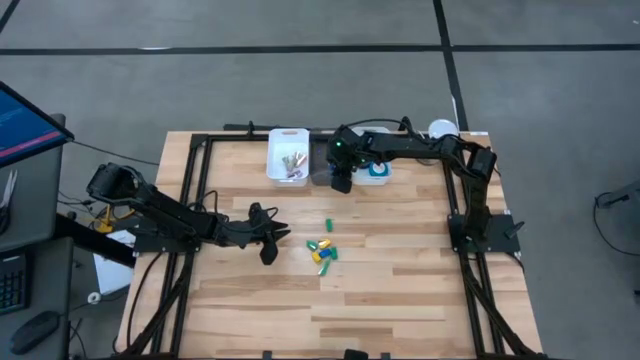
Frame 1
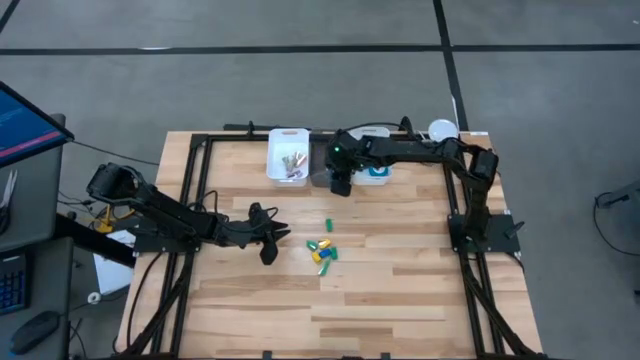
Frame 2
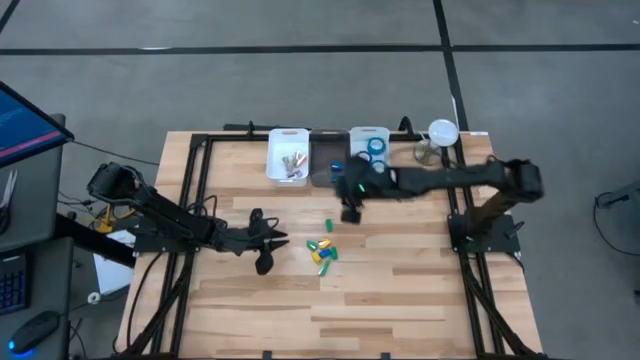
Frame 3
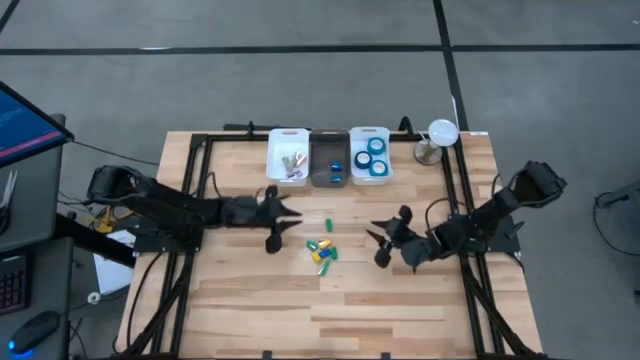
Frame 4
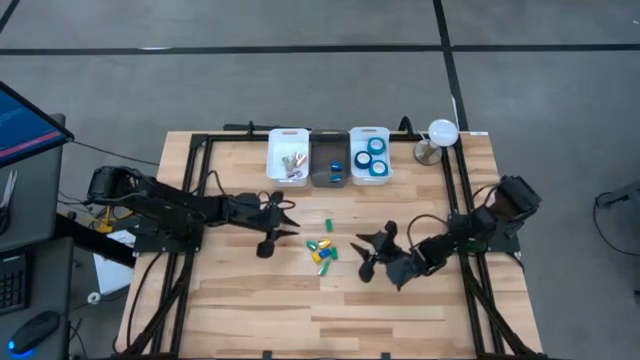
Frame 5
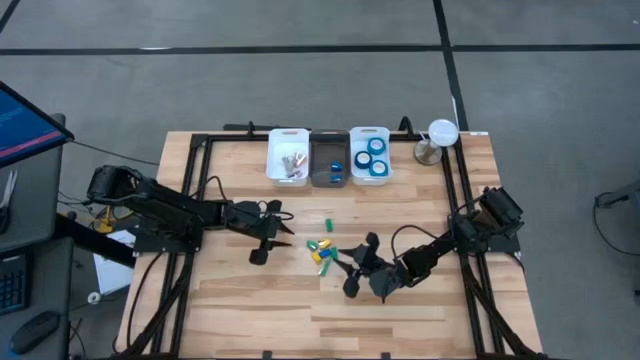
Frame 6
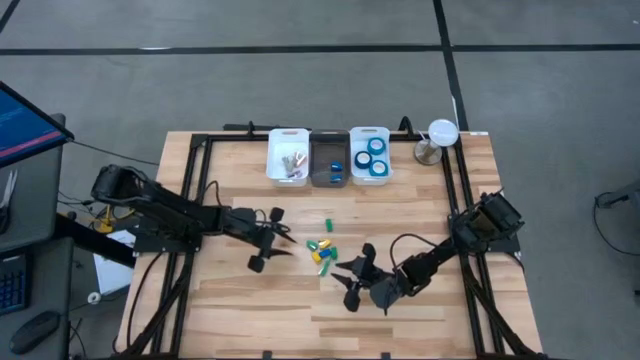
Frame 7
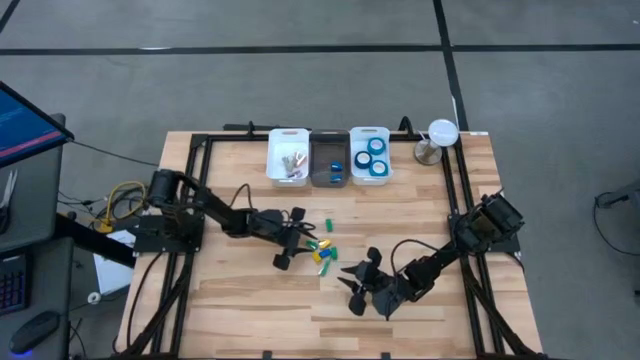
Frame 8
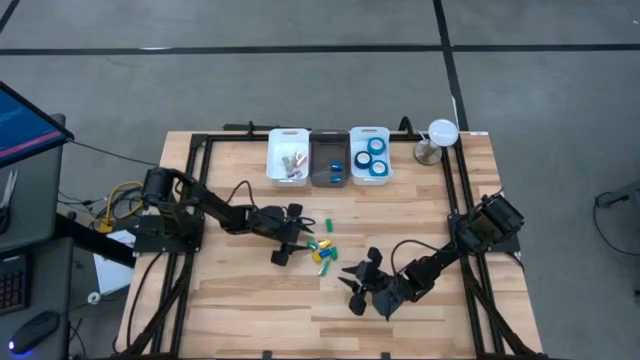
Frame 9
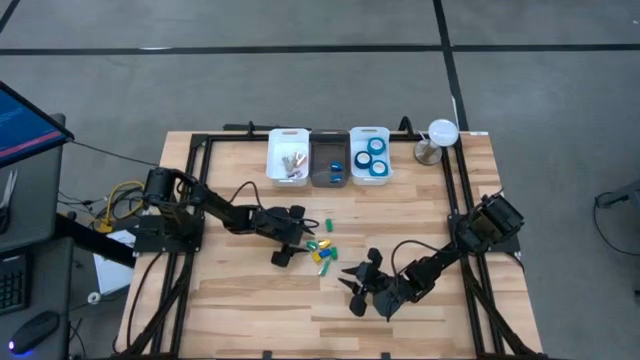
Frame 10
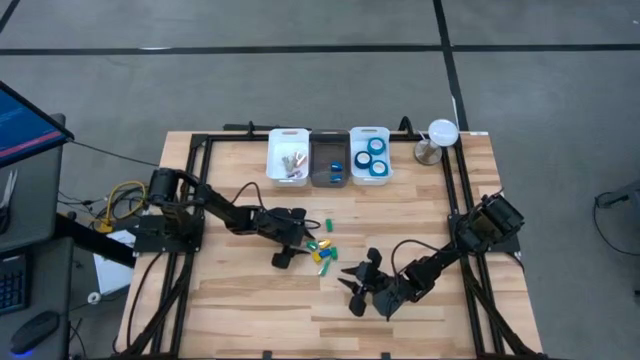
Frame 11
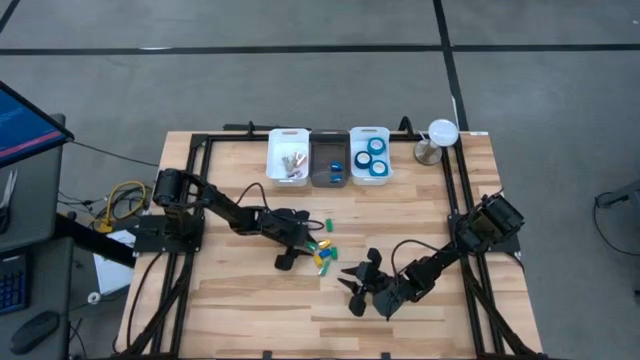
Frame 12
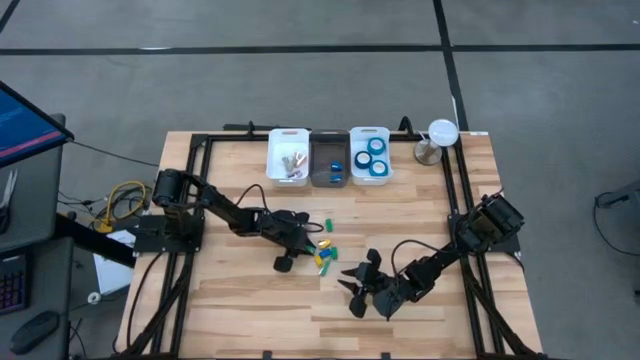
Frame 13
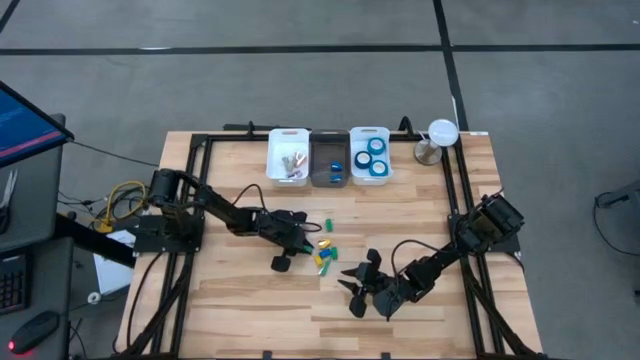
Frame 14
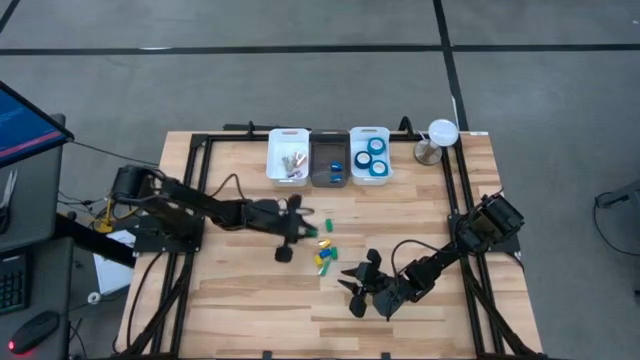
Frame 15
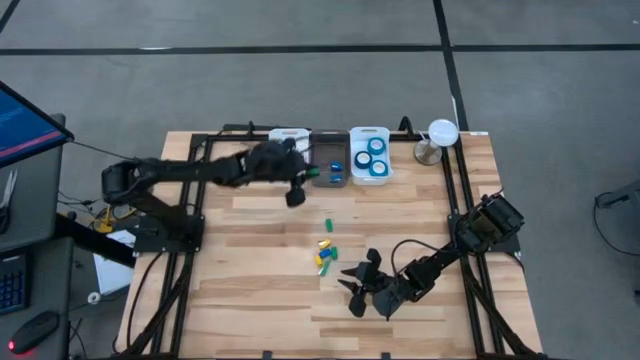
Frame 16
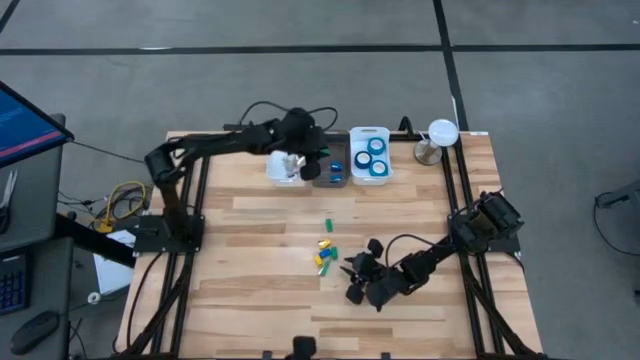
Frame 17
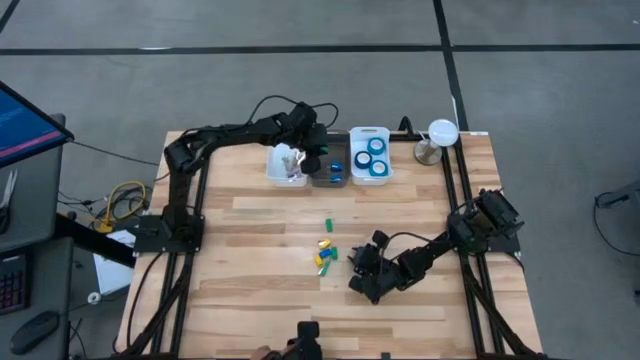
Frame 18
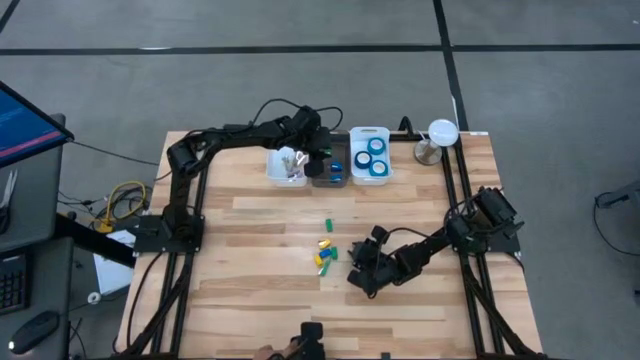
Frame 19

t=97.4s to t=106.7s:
Task: Pick and place Stapler, Stapler remover, tape
Put the green stapler into the black bin

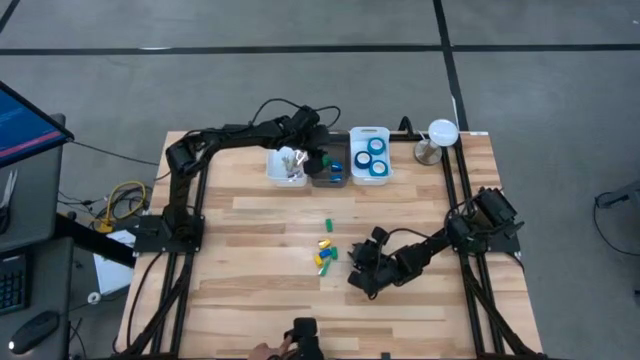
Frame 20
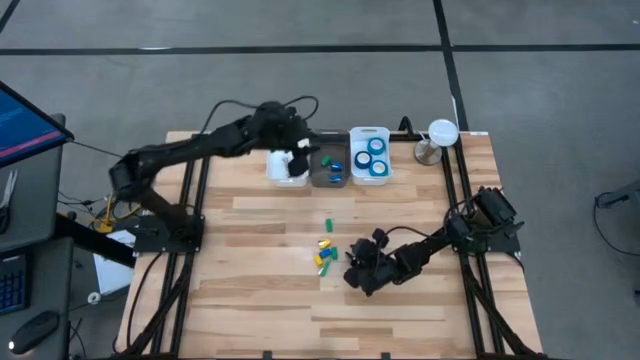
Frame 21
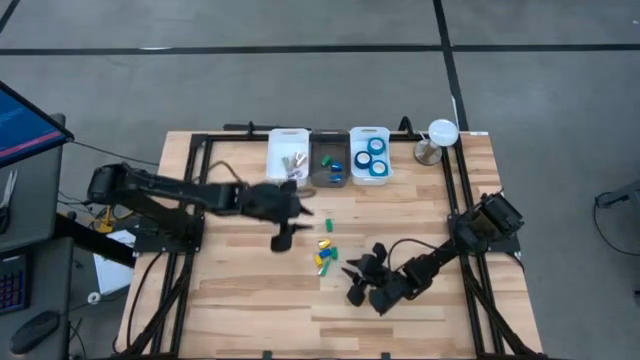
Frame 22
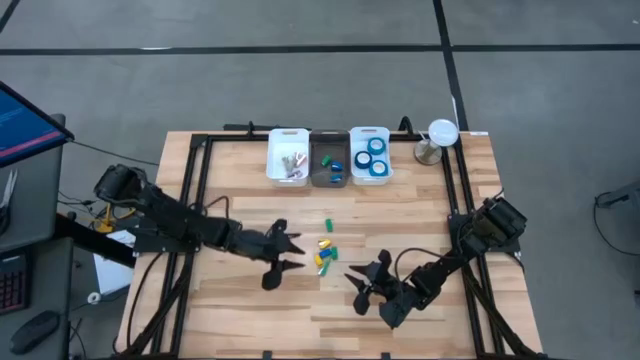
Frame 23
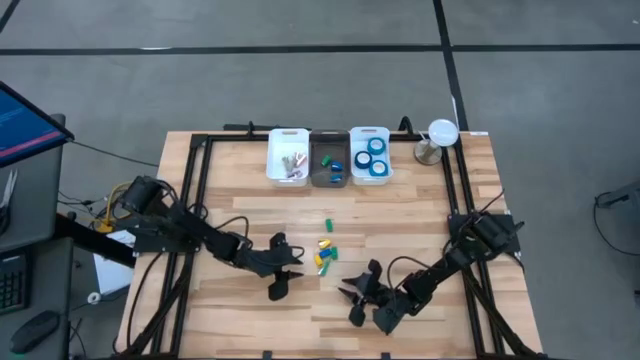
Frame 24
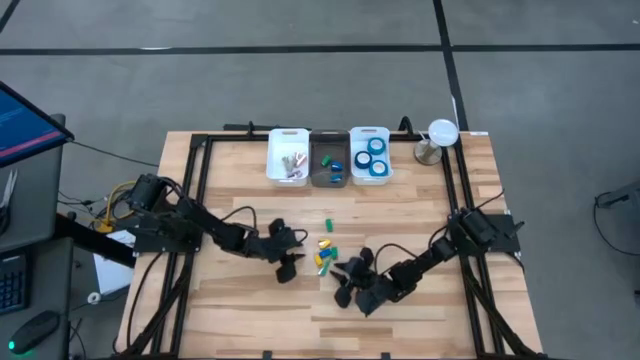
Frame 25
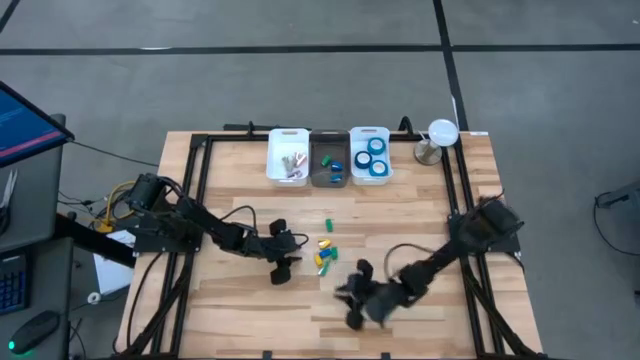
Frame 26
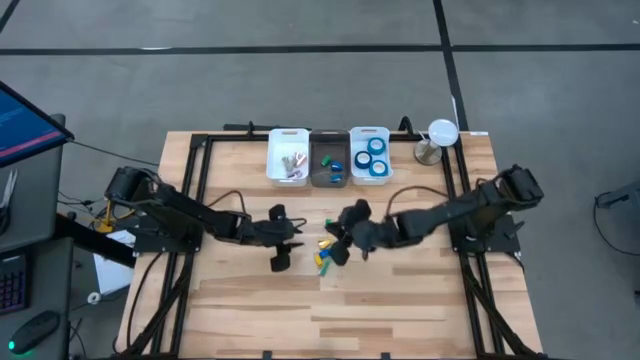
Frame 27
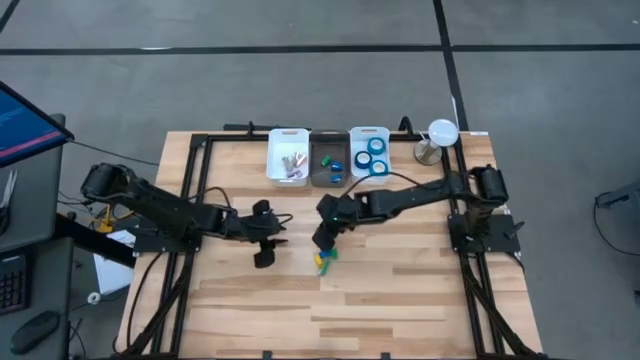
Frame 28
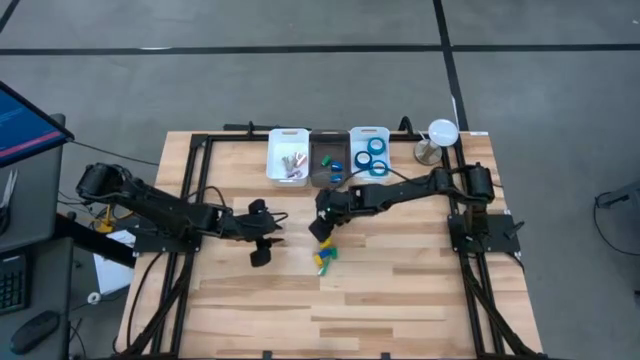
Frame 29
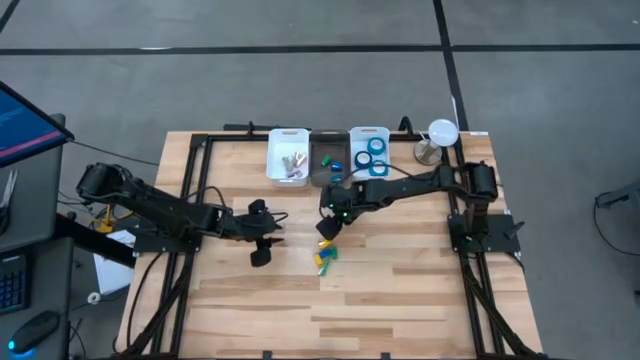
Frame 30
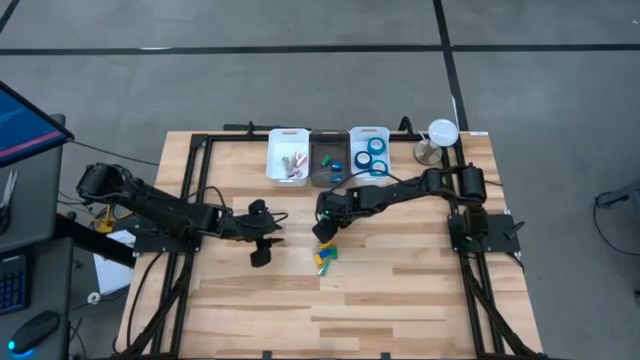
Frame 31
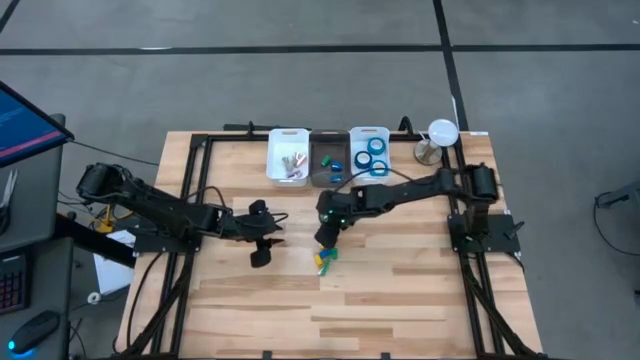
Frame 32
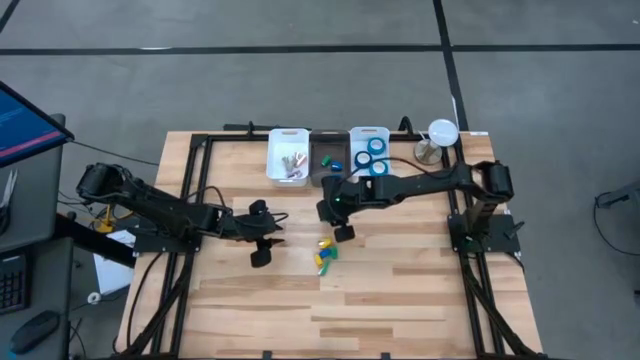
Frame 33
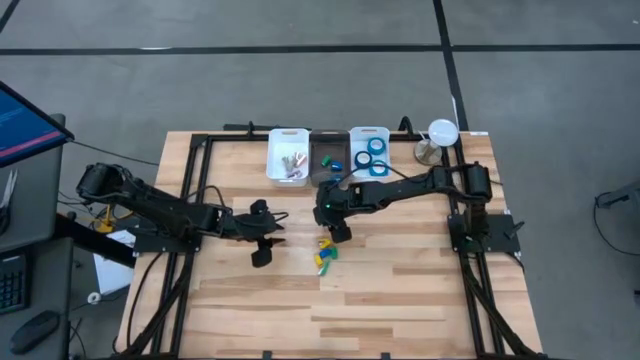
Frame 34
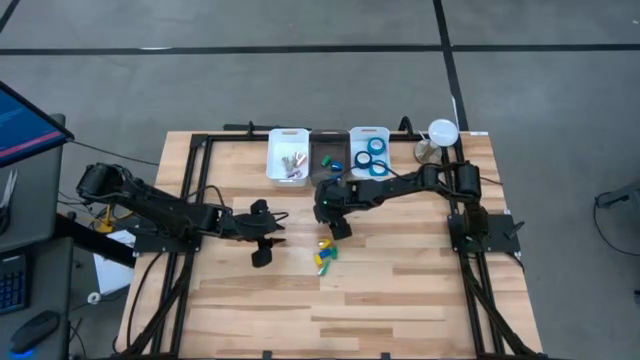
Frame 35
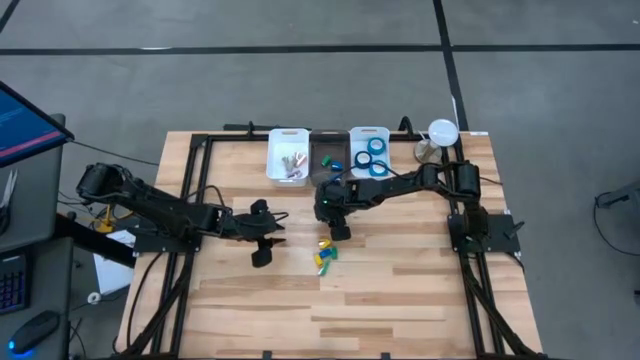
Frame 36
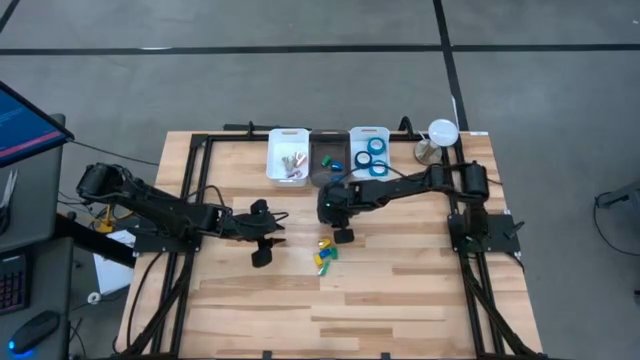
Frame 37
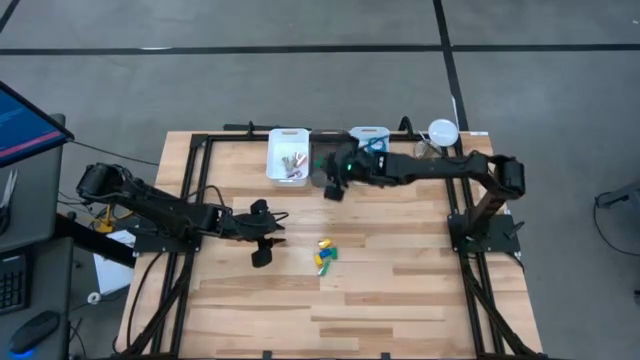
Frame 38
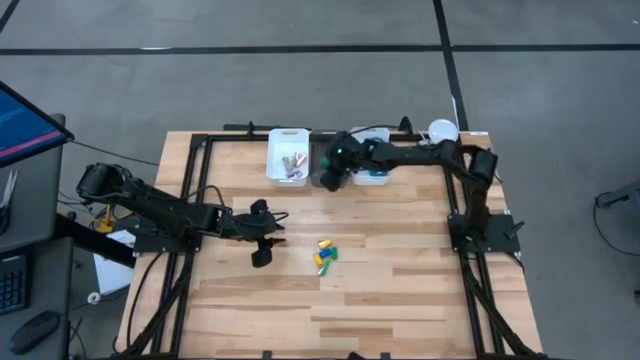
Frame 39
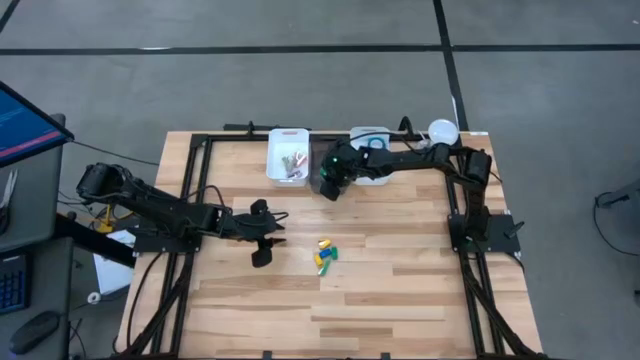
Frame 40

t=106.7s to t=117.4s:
Put the green stapler into the black bin

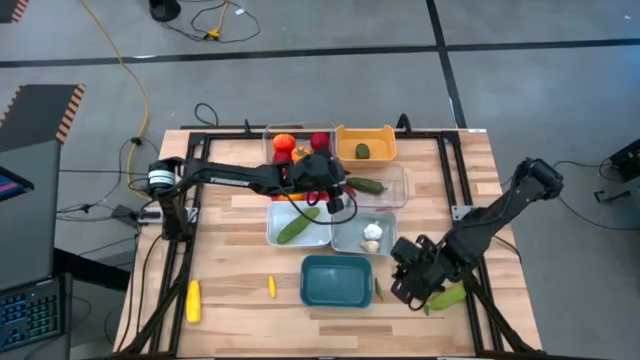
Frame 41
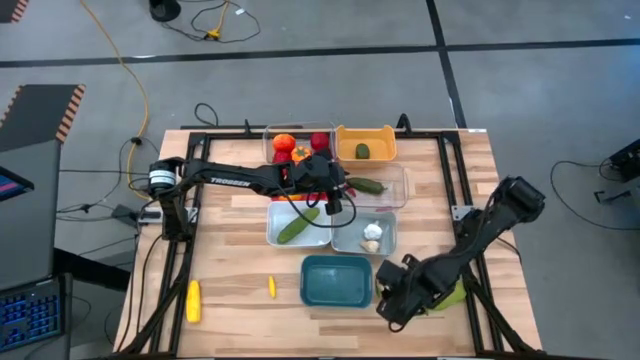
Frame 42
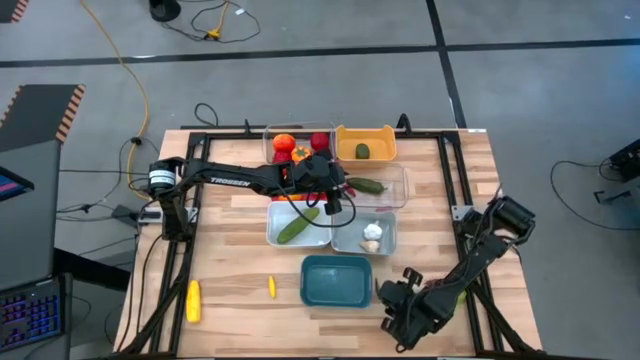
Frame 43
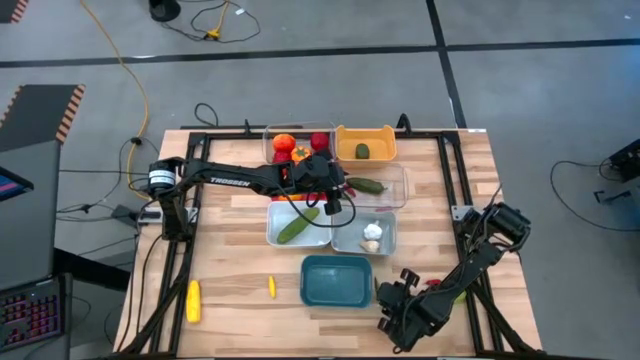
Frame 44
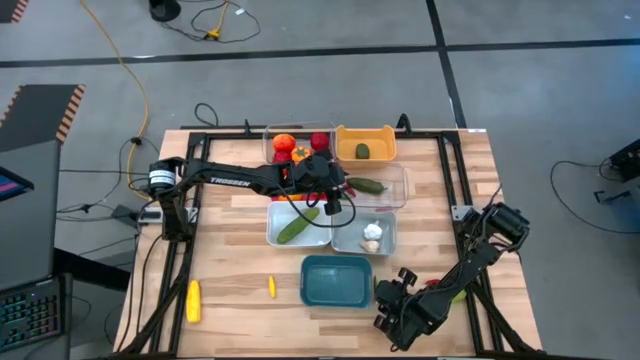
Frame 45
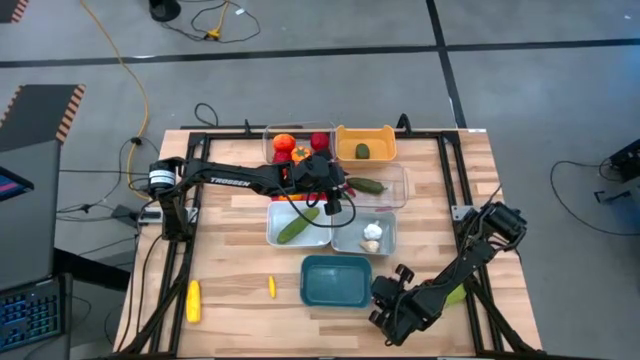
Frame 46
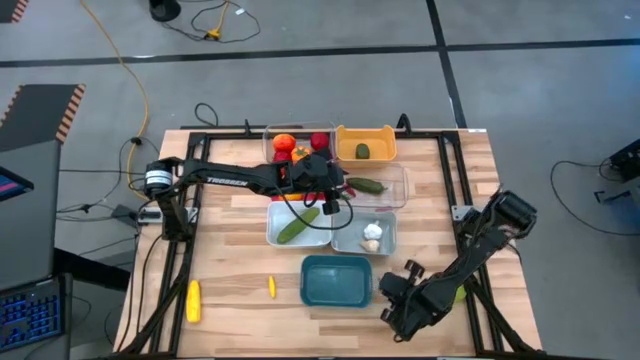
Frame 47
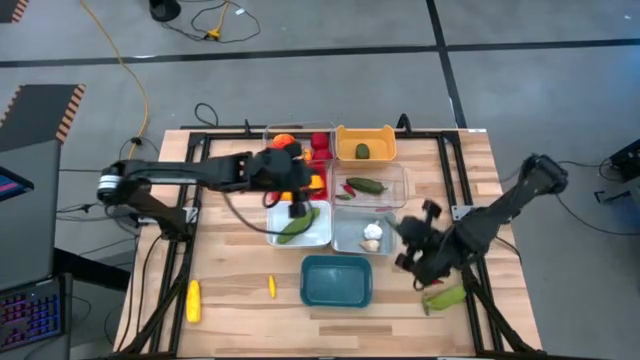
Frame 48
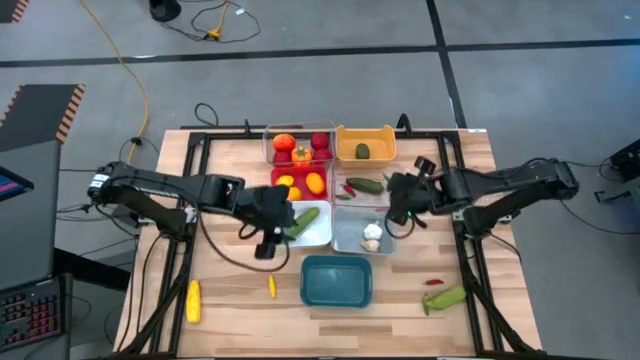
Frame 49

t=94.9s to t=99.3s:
Task: Sort produce into baskets
Put the top green chili pepper into the bottom transparent bin
